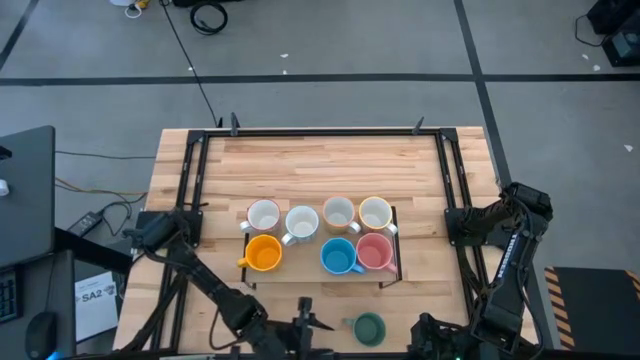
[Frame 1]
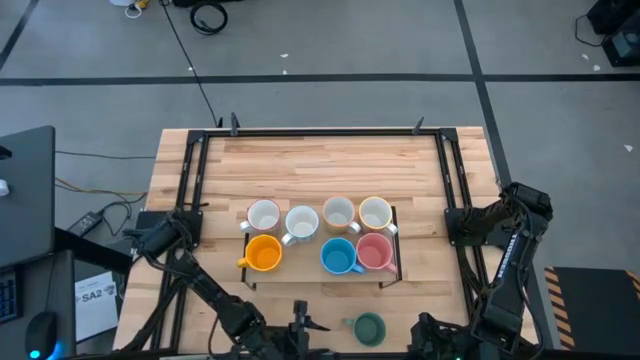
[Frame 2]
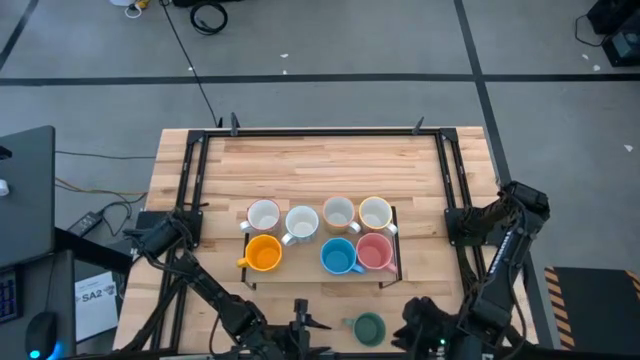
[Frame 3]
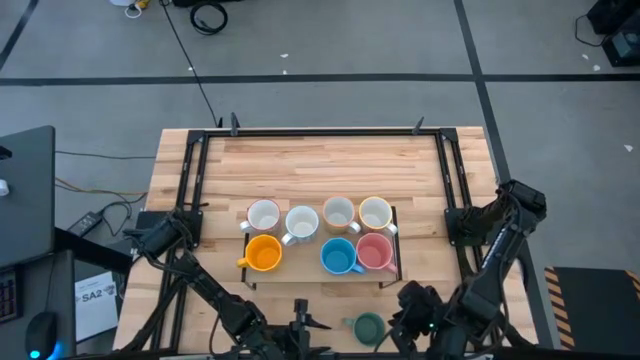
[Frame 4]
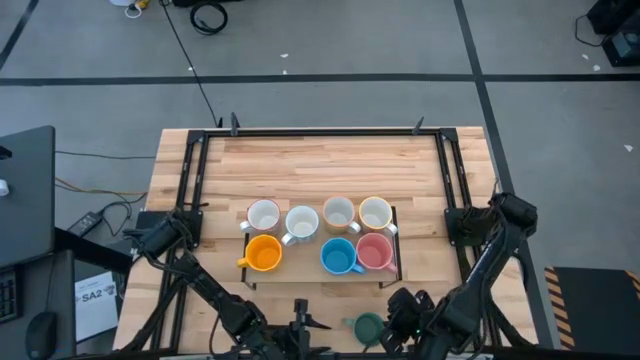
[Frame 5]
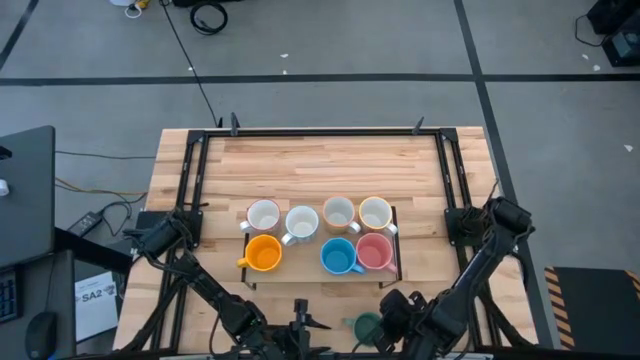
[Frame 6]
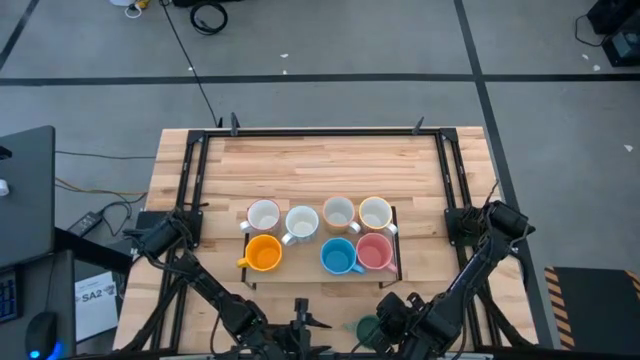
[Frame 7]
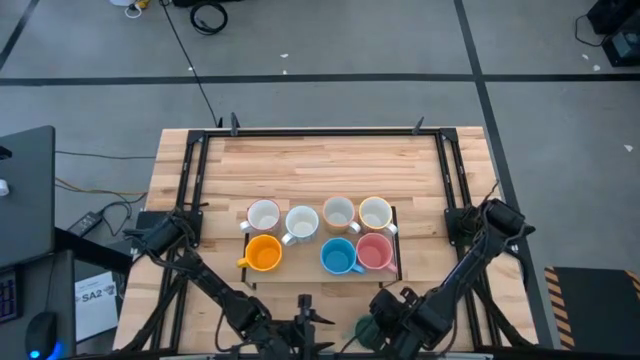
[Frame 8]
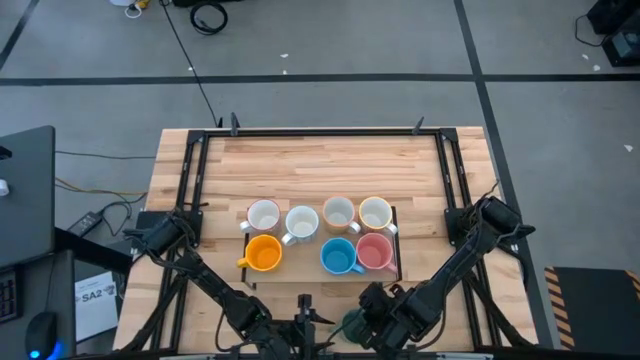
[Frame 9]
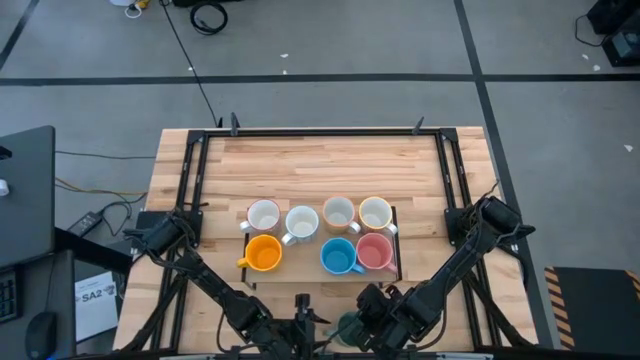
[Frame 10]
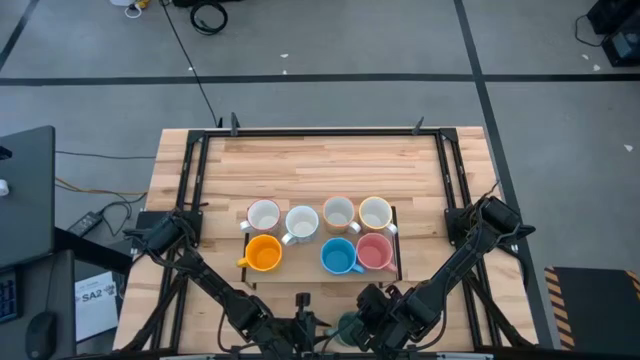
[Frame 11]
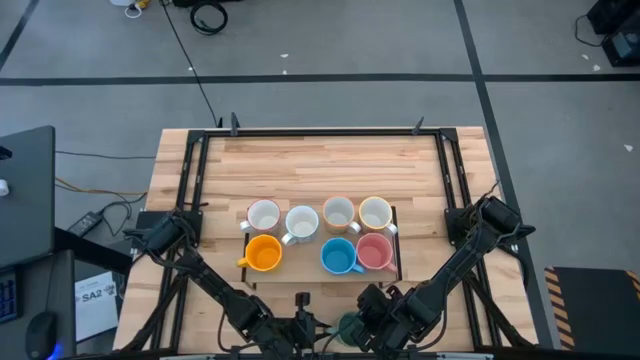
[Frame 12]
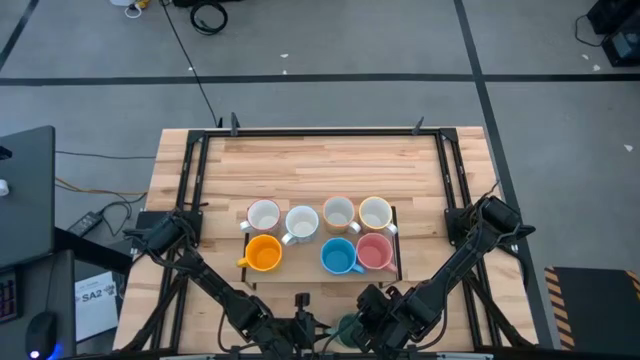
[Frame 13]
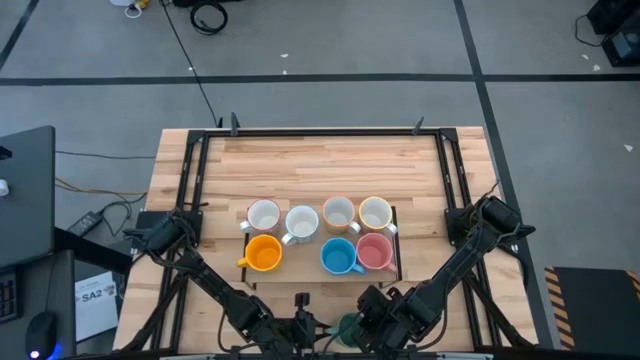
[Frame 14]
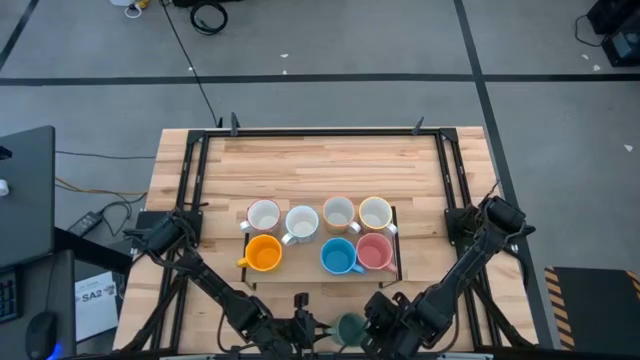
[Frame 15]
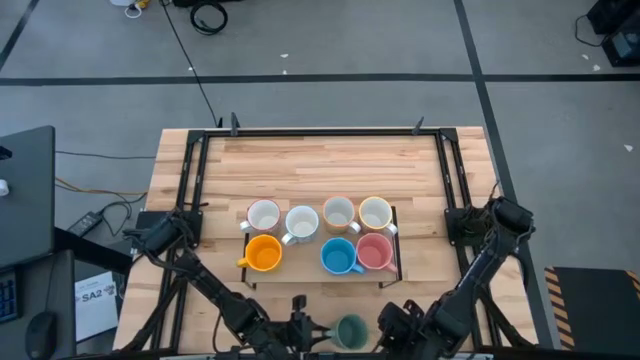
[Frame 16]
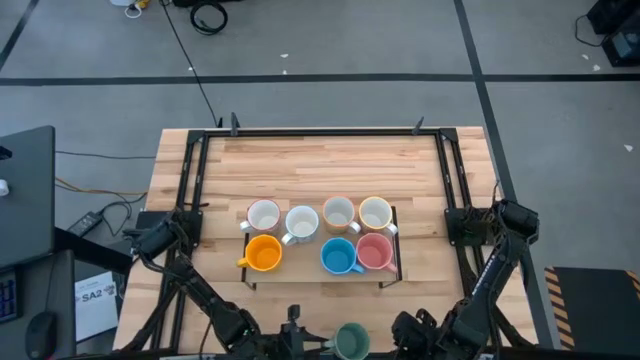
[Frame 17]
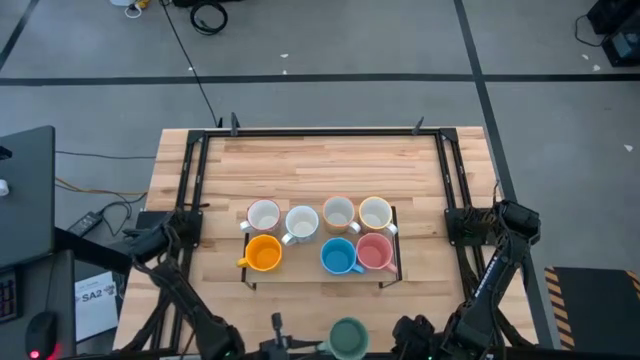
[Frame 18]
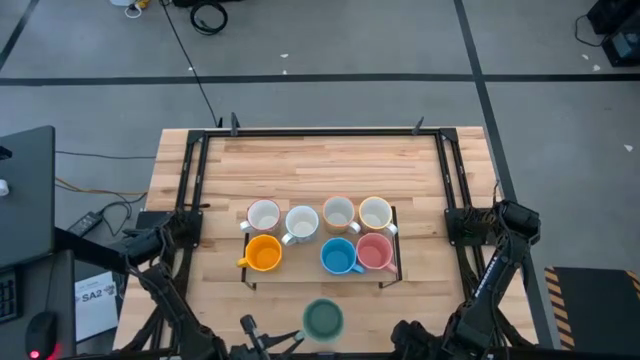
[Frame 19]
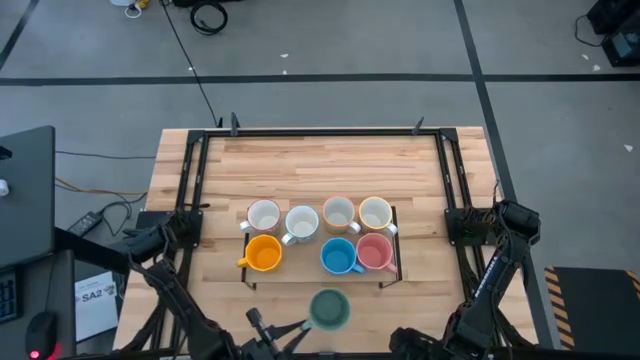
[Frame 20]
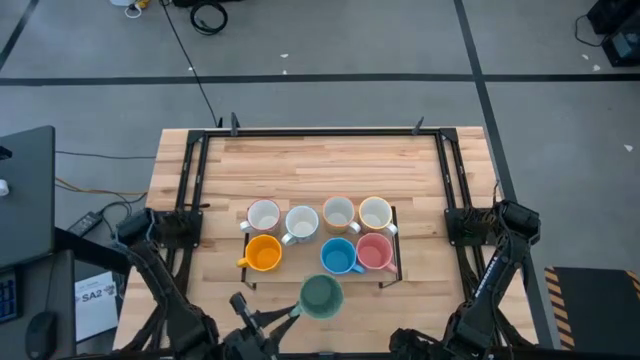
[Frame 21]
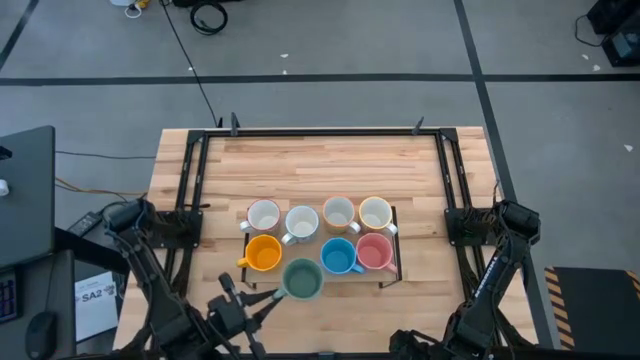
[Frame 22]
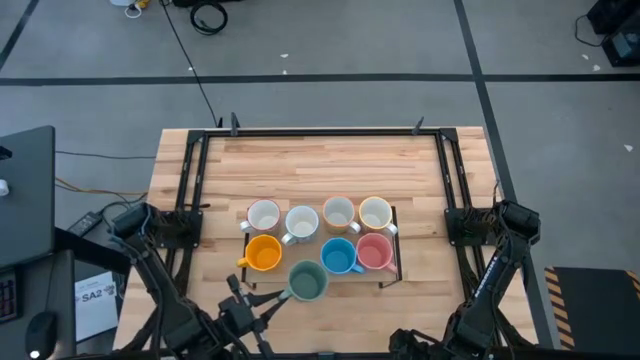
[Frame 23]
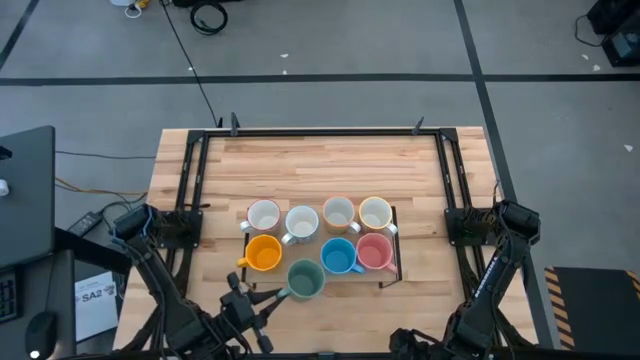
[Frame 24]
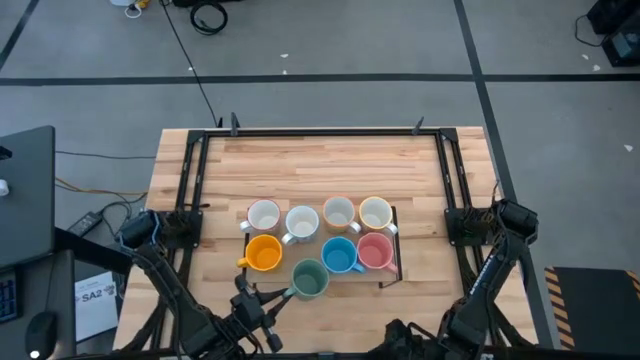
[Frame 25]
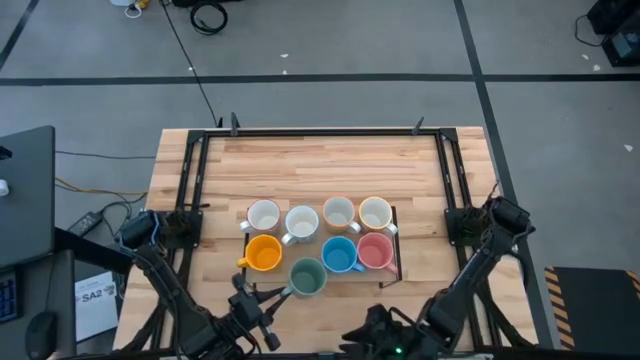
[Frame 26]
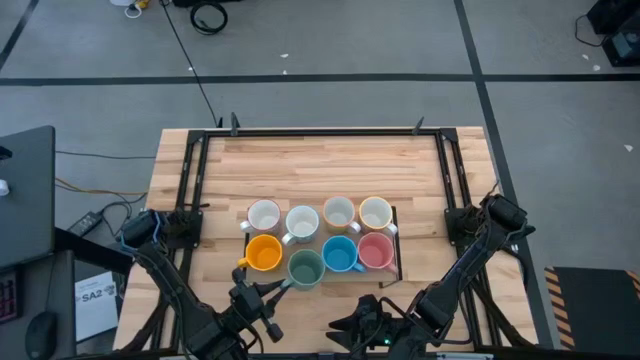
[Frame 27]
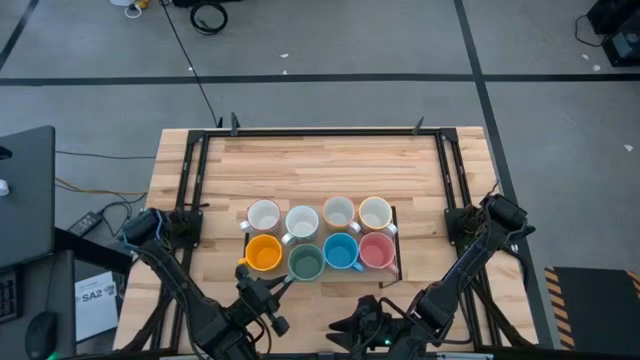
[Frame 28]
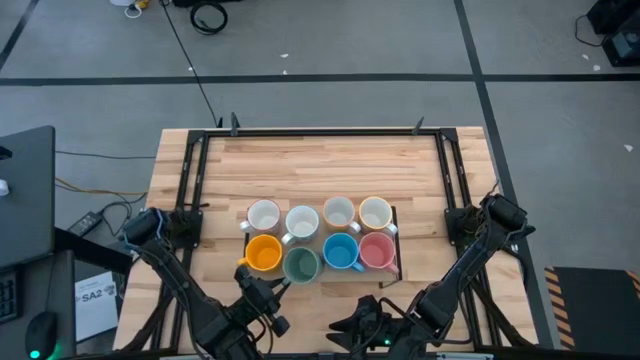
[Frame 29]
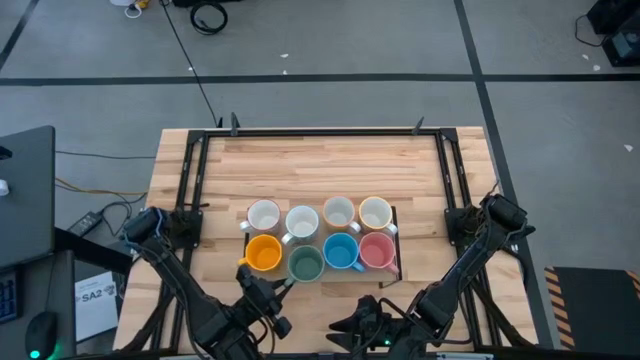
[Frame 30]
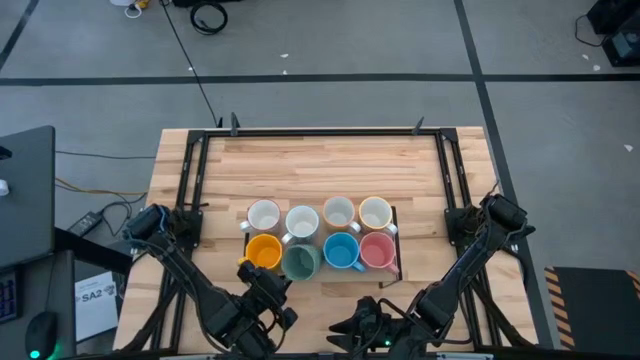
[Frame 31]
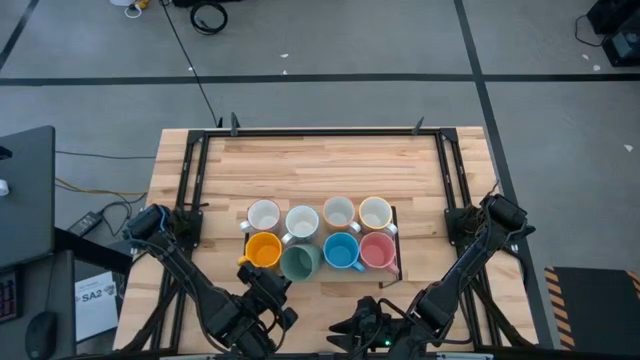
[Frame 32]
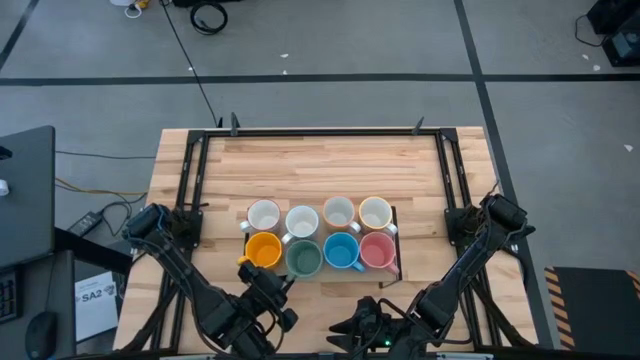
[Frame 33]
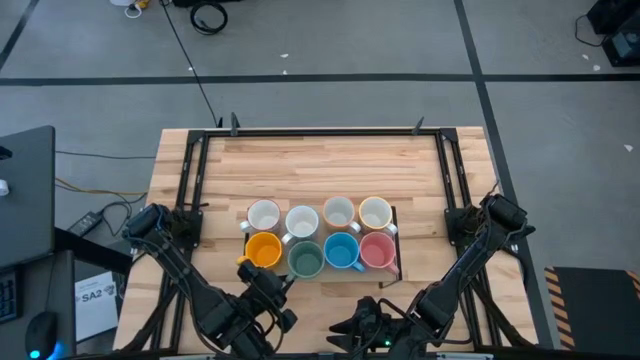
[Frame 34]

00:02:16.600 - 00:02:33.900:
Task: Place coffee mugs
Put the green mug on the shelf

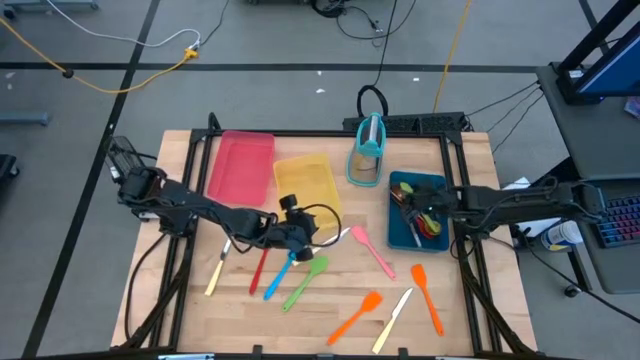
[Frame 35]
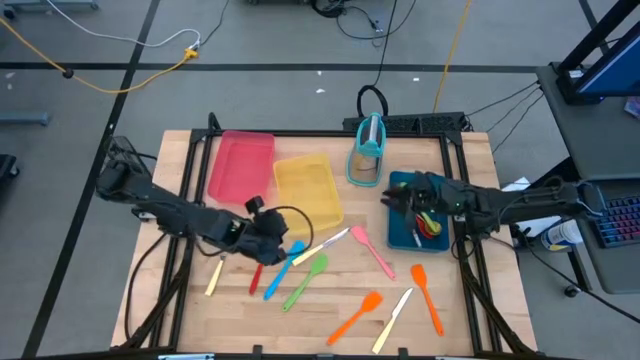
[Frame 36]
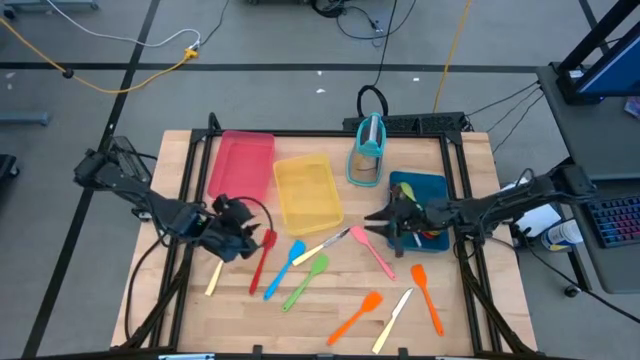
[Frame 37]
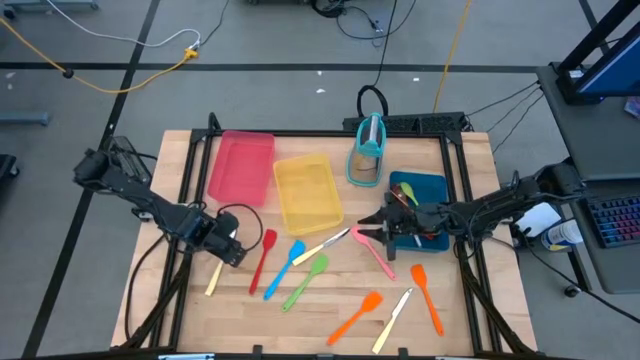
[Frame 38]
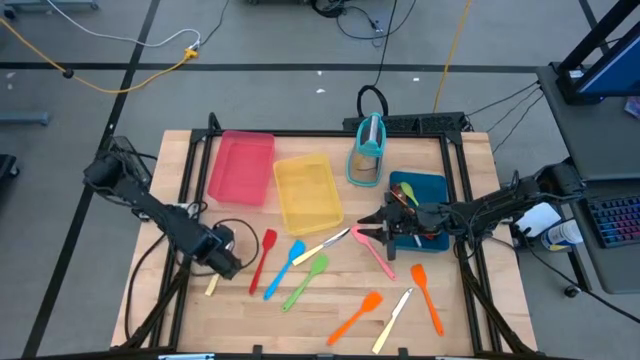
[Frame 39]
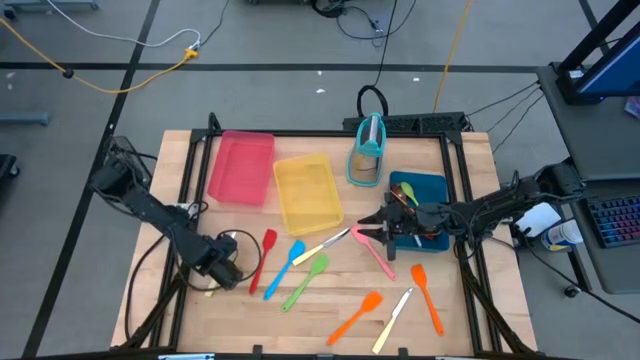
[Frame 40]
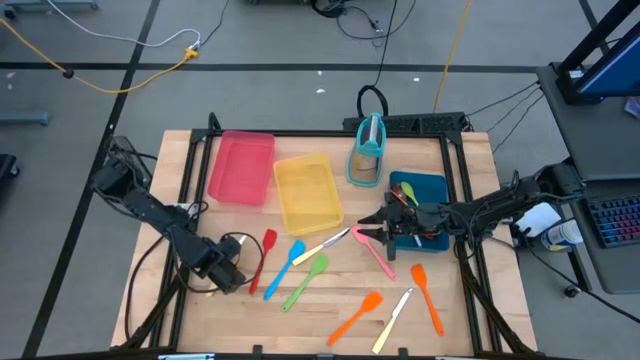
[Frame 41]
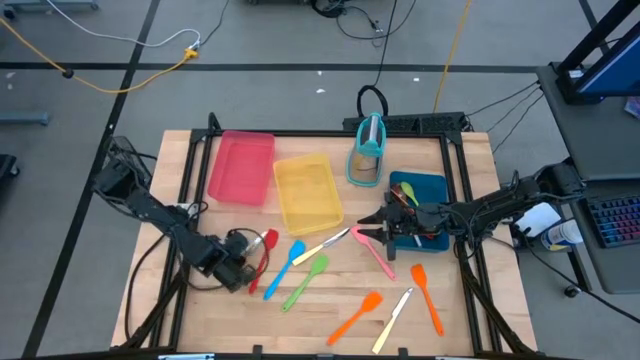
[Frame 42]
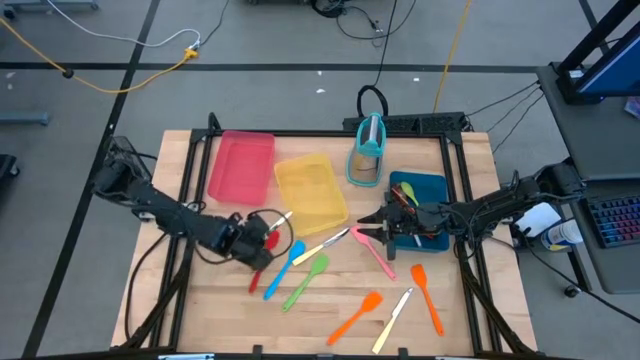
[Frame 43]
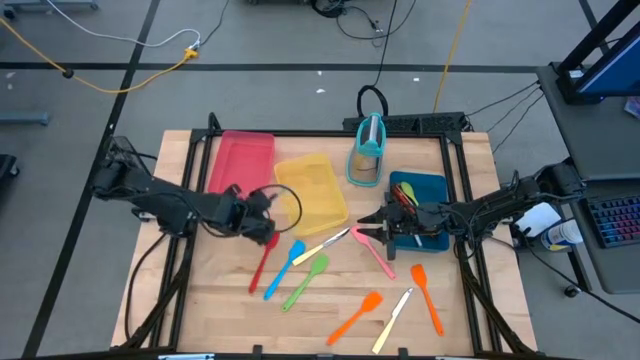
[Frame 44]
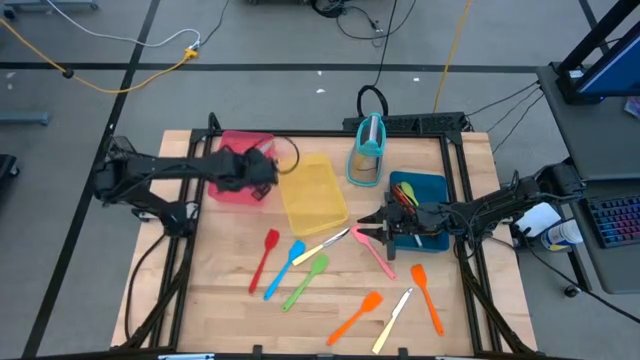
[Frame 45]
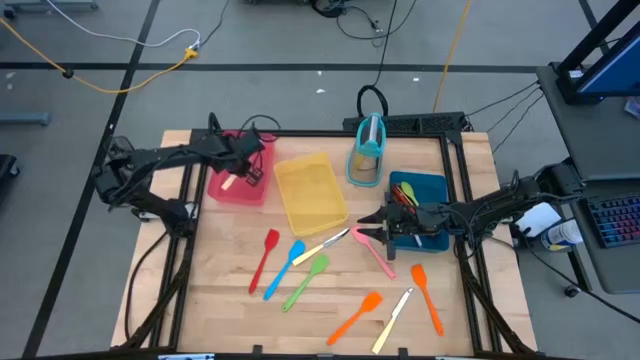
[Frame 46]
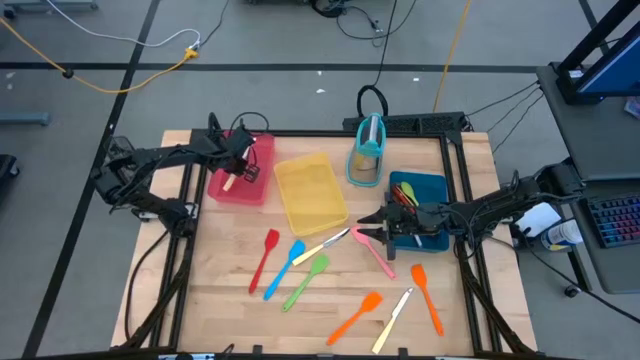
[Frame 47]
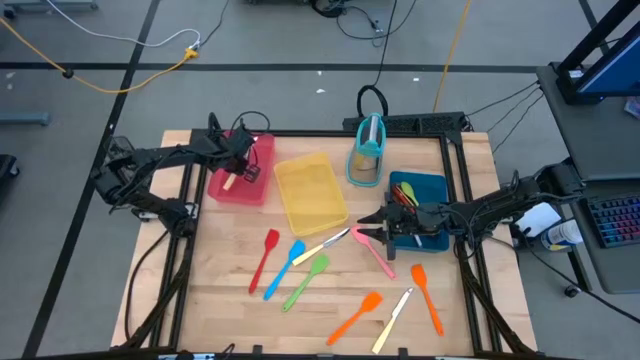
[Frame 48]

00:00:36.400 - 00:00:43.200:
Task: Pick & Place Kitchen Items
Put the left yellow knife into the red bin
